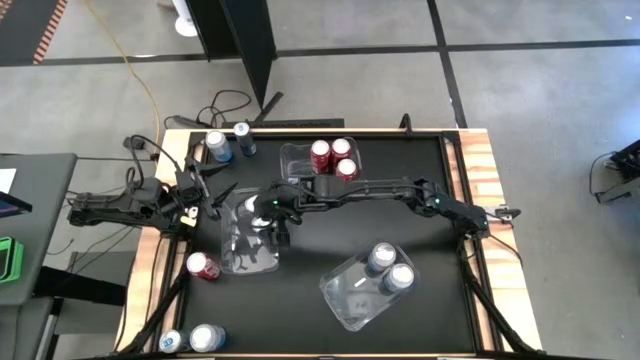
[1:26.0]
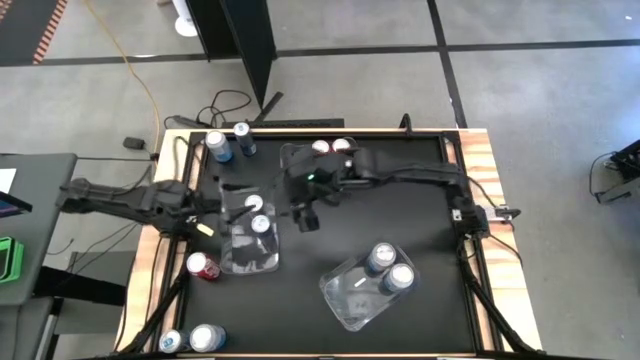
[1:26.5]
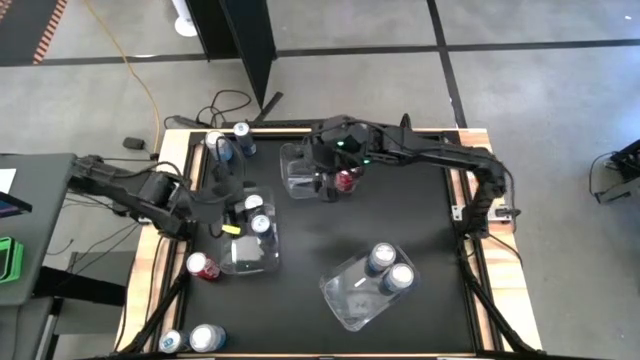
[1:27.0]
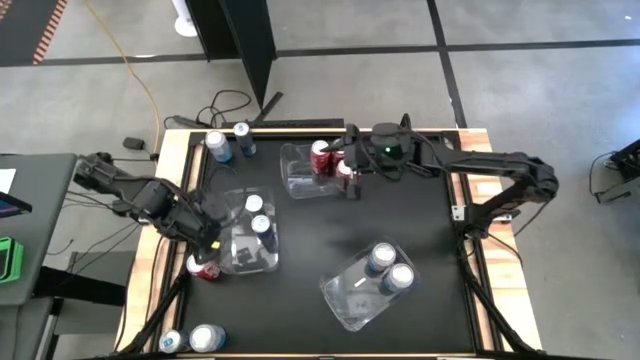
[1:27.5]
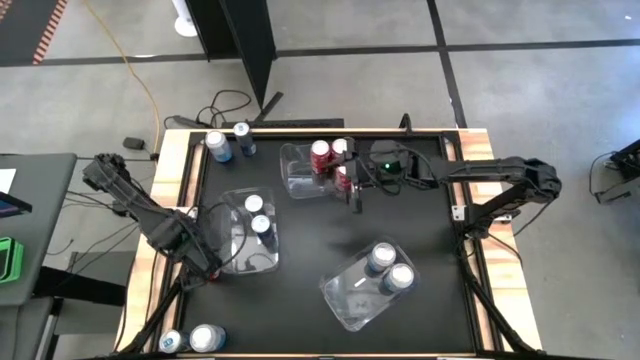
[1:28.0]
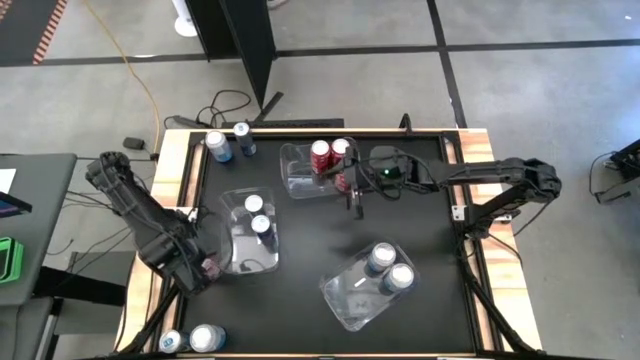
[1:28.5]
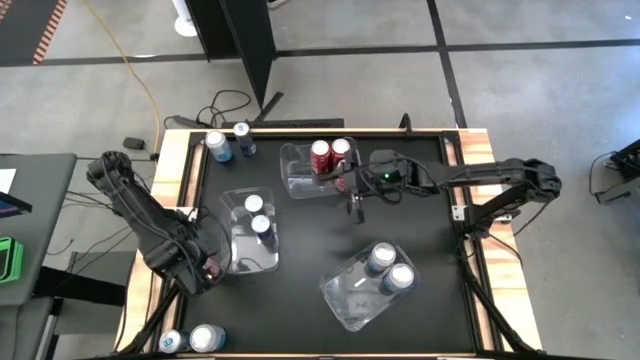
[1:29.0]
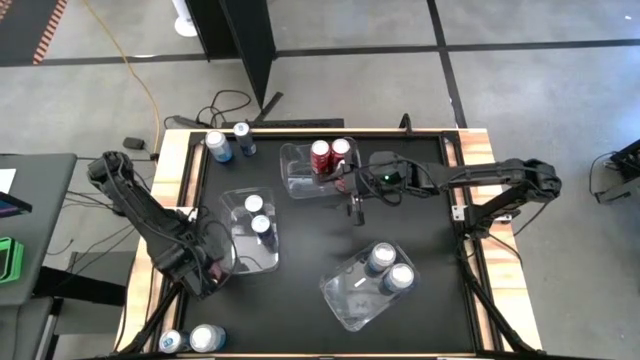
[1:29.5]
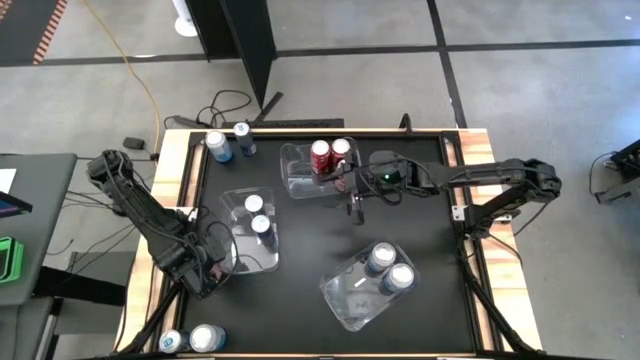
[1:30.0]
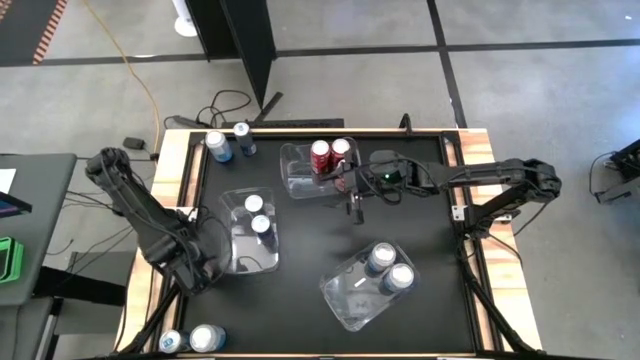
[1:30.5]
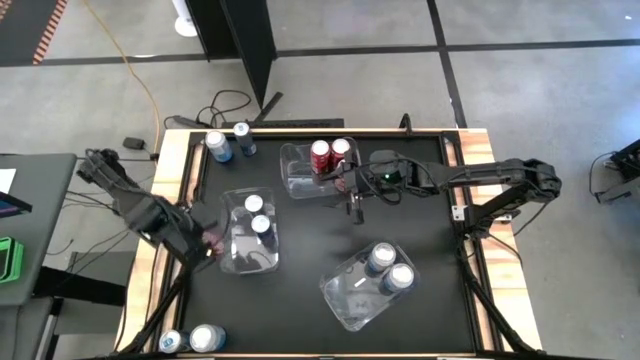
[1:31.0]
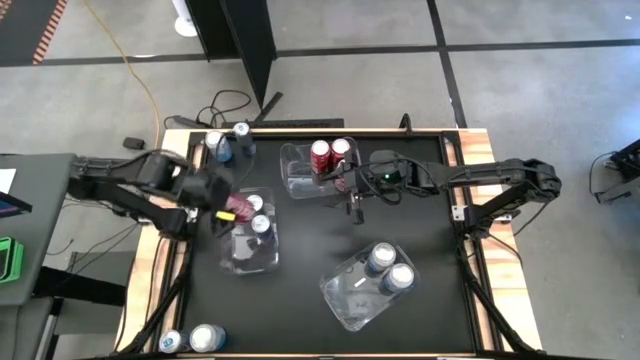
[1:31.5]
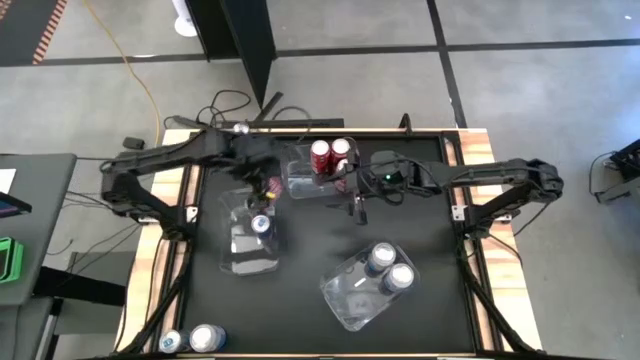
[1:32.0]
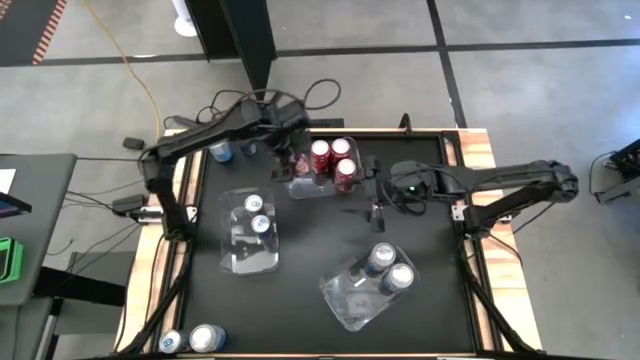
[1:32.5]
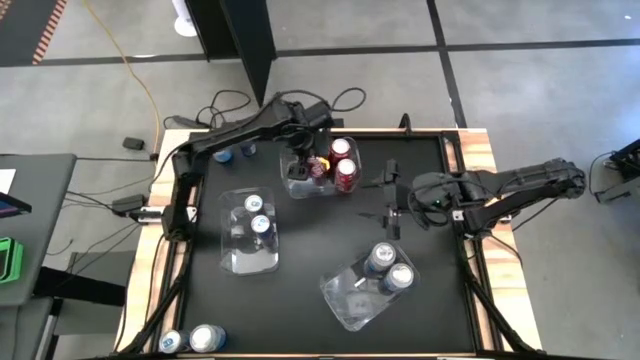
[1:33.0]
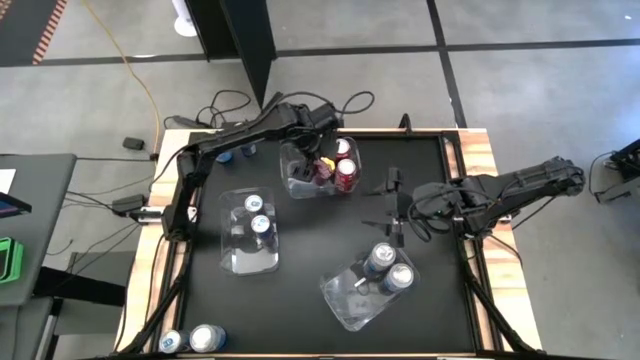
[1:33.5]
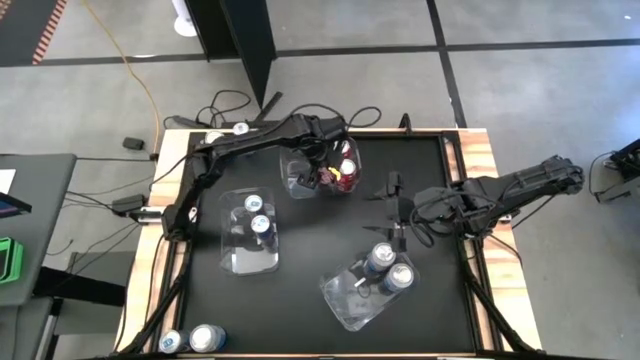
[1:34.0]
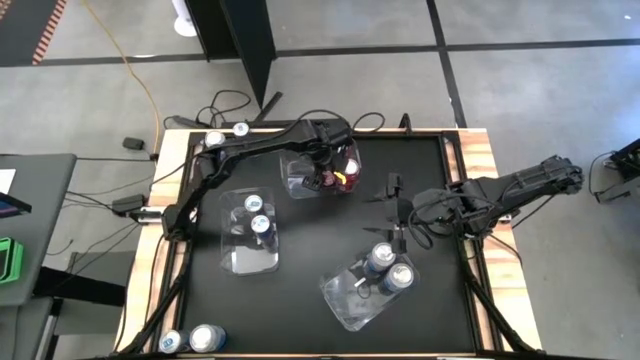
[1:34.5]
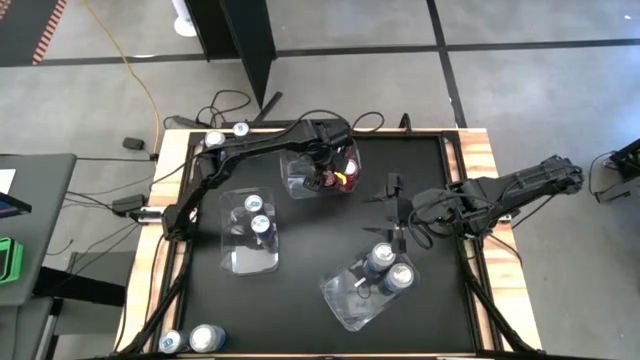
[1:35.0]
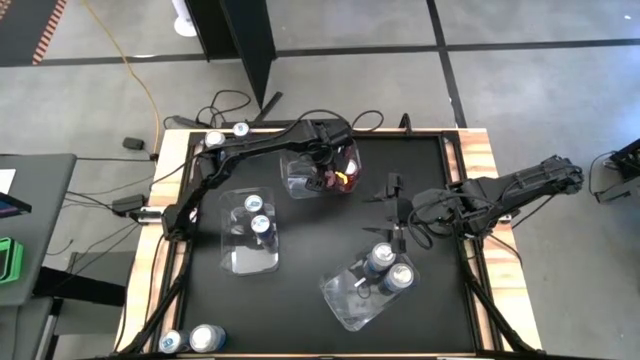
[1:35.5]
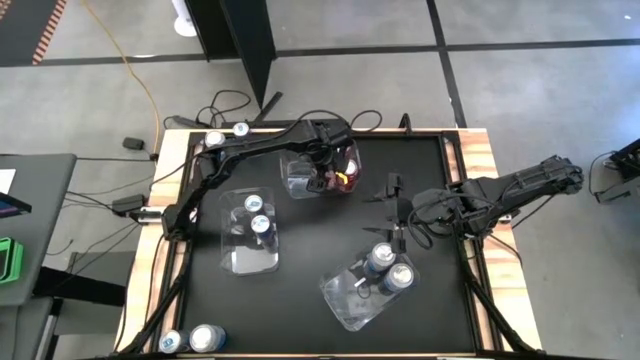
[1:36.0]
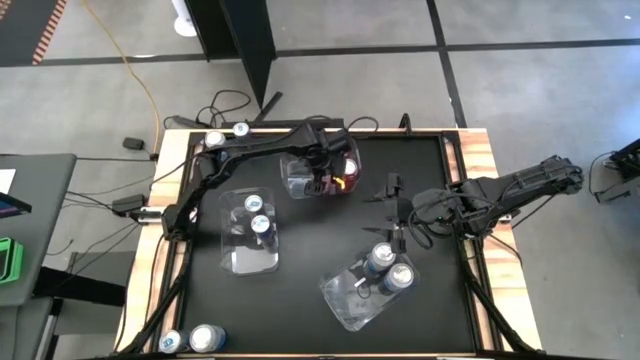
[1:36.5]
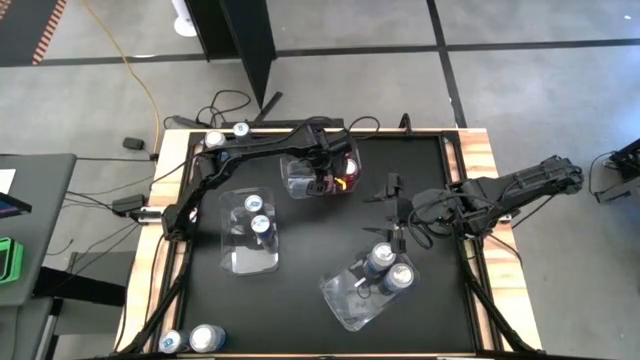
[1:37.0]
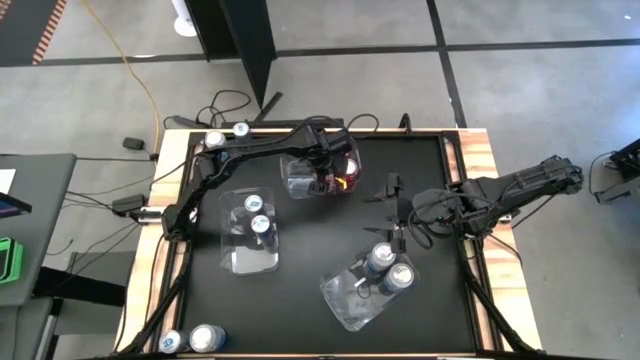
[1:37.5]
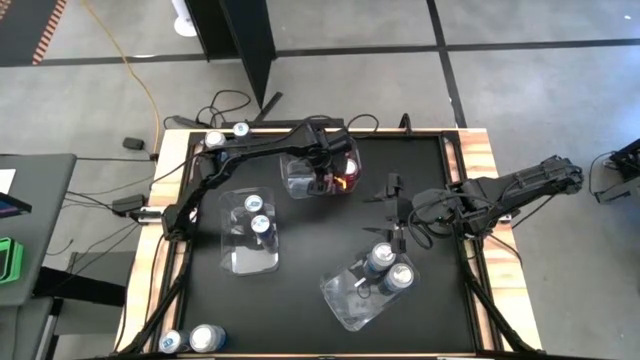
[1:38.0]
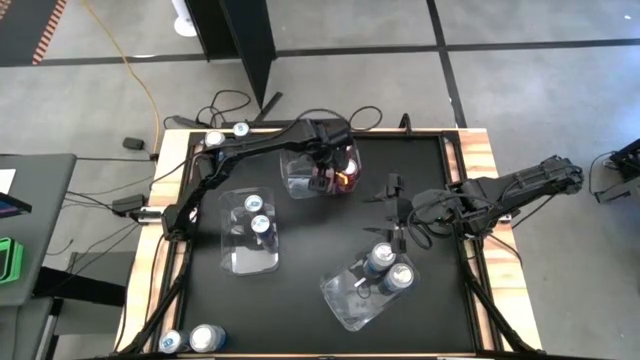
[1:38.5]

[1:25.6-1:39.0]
Task: Sort soda cans
Put the red soda can into the top transparent bin

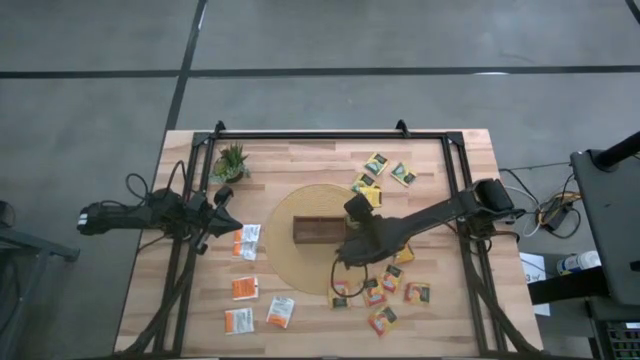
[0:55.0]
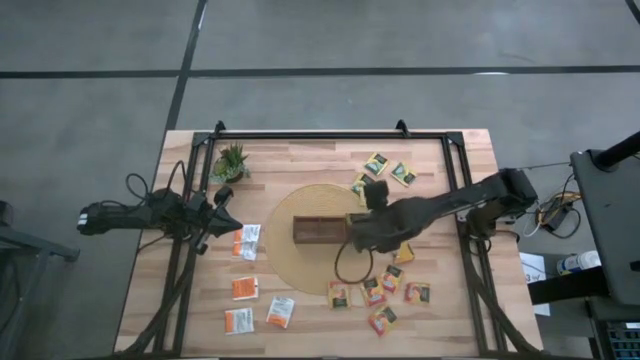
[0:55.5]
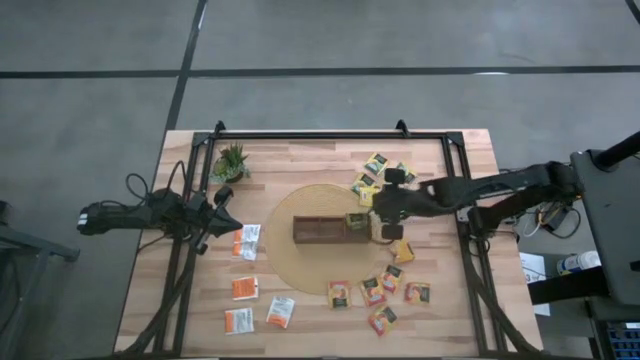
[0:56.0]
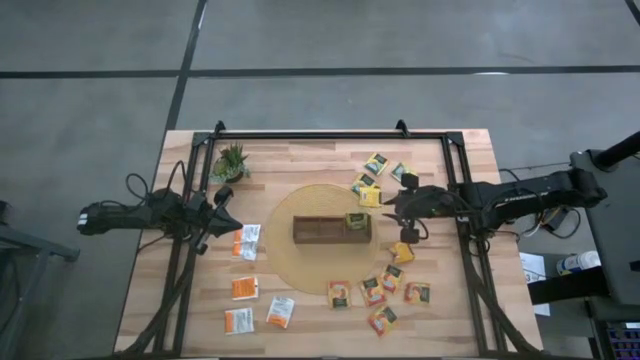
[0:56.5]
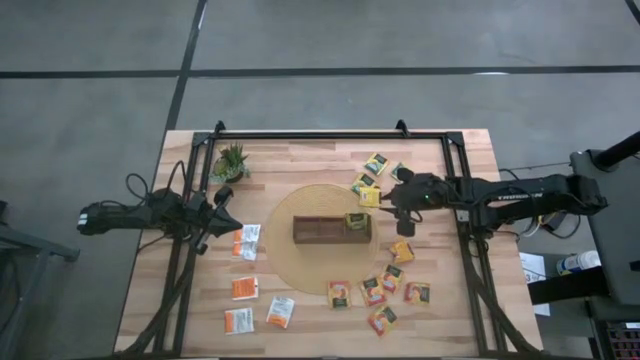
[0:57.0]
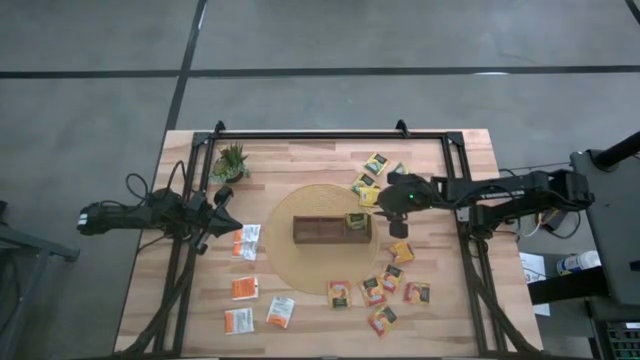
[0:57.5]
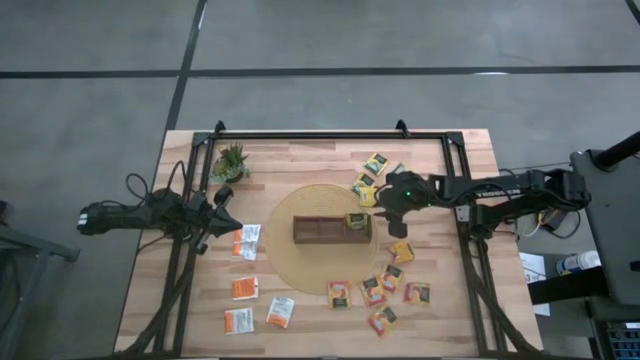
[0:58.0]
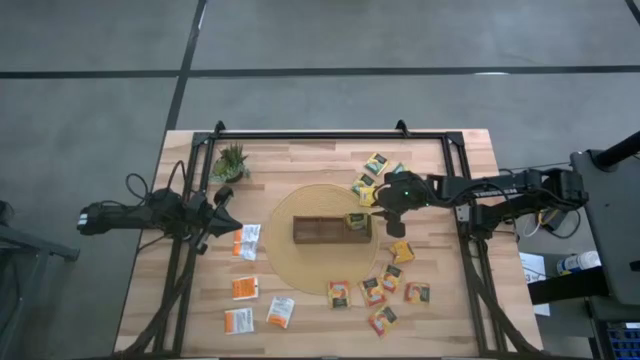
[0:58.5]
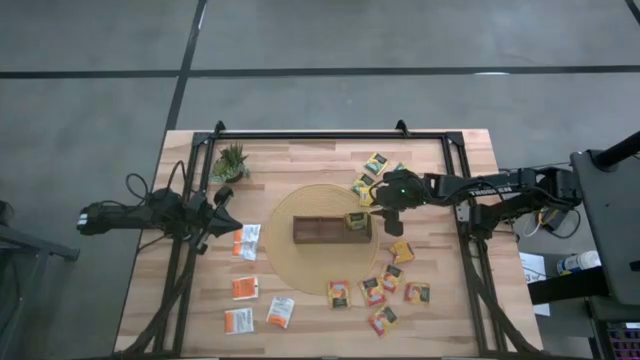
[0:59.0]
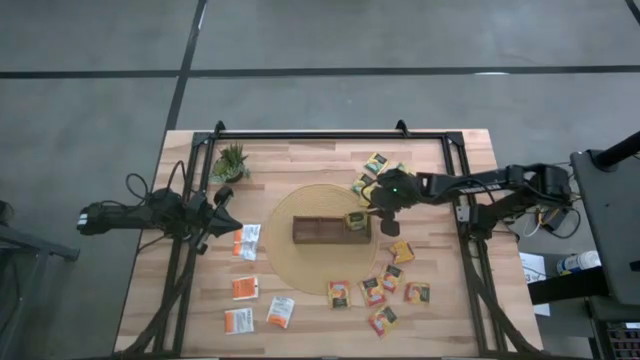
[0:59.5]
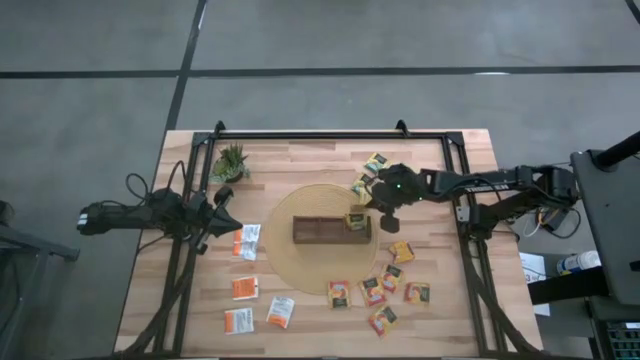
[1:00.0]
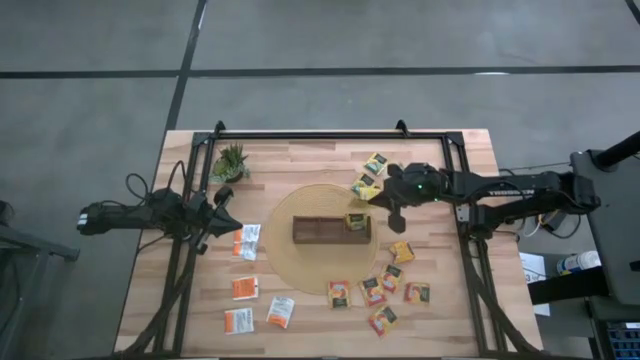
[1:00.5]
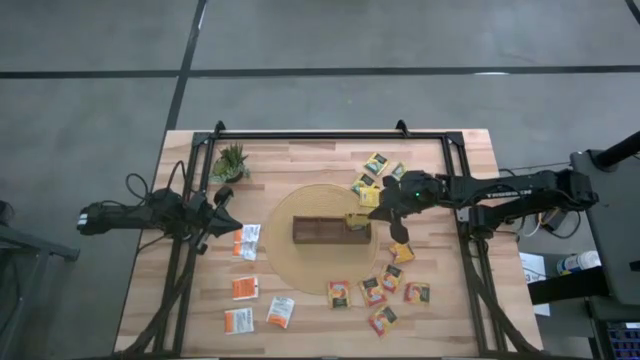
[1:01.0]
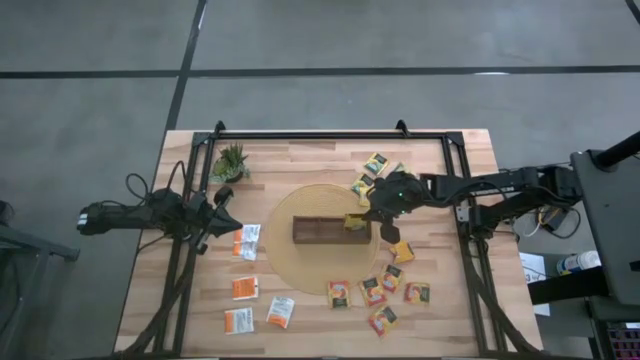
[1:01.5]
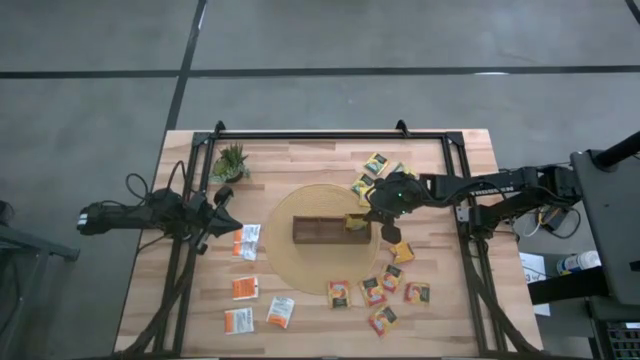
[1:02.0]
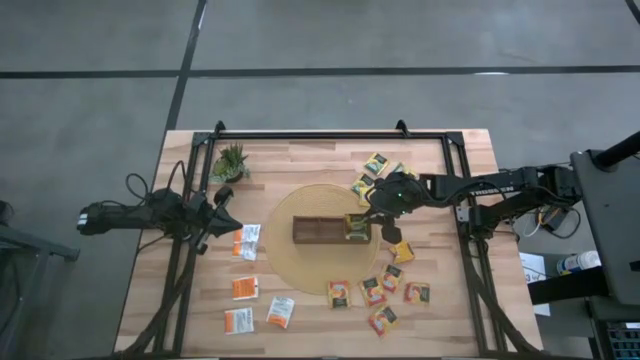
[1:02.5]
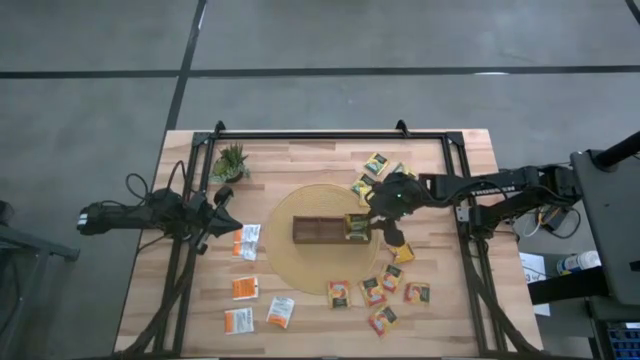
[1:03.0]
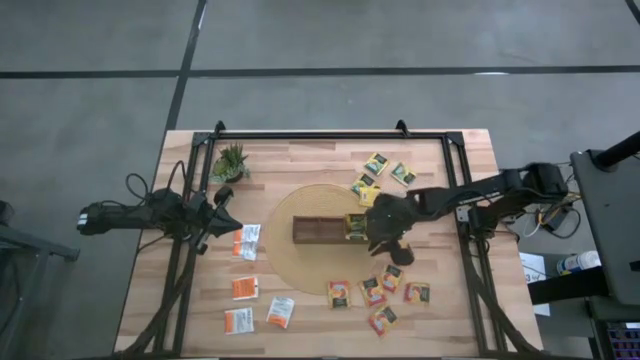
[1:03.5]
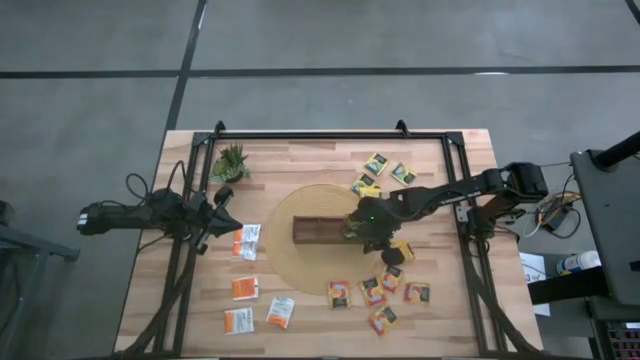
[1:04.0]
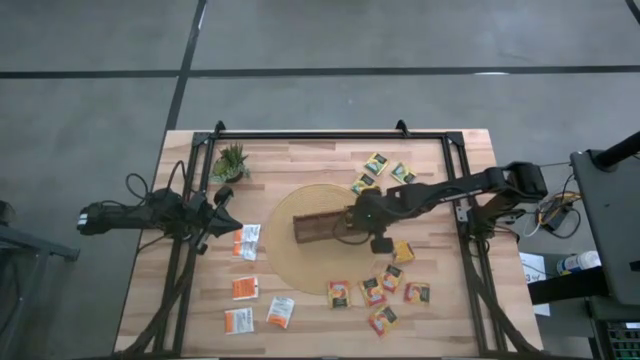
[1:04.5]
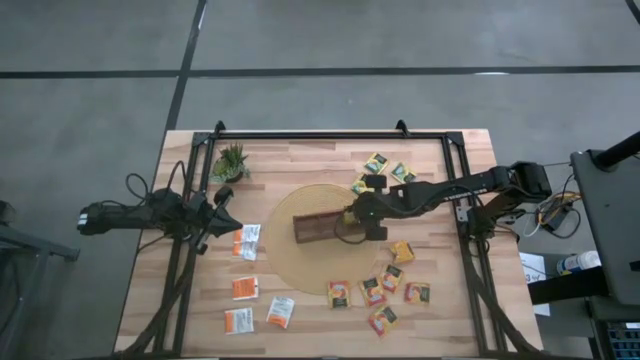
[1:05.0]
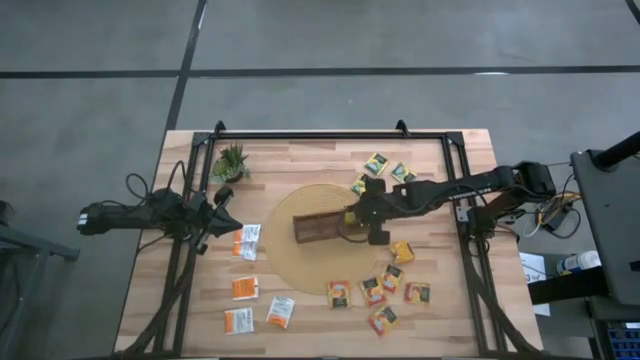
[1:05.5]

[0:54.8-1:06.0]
Task: Pick & Place Tea
Put the yellow tea bag into the right of the wooden organizer
